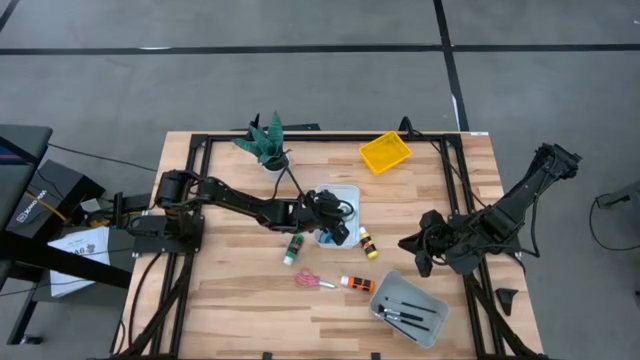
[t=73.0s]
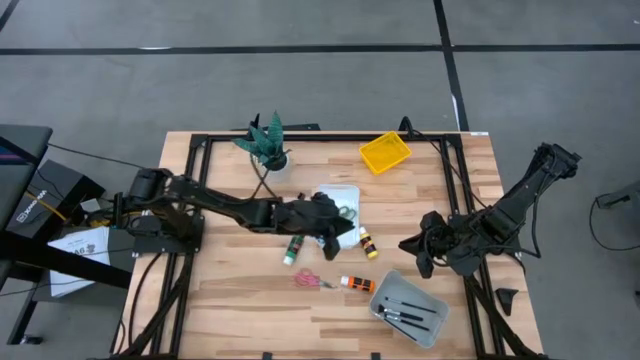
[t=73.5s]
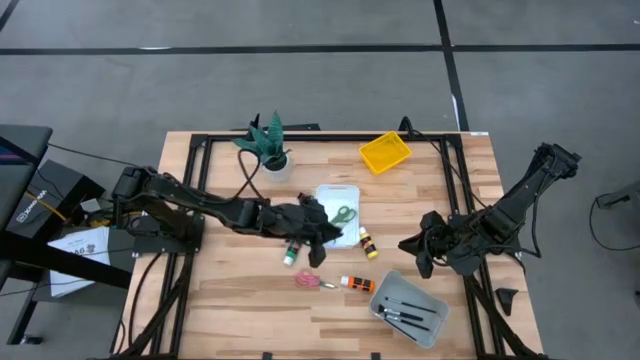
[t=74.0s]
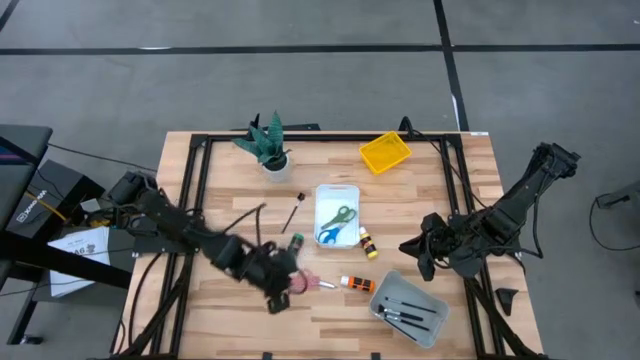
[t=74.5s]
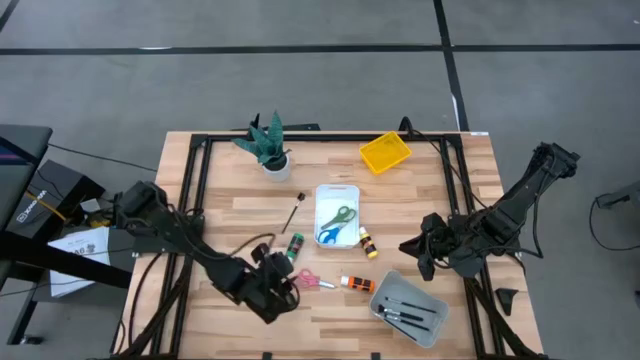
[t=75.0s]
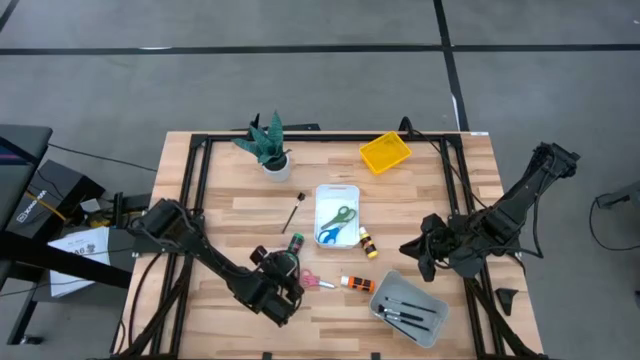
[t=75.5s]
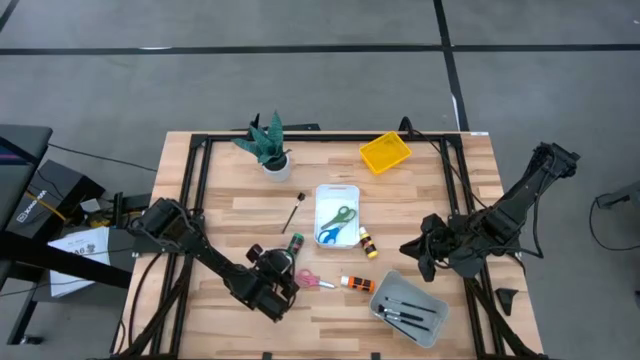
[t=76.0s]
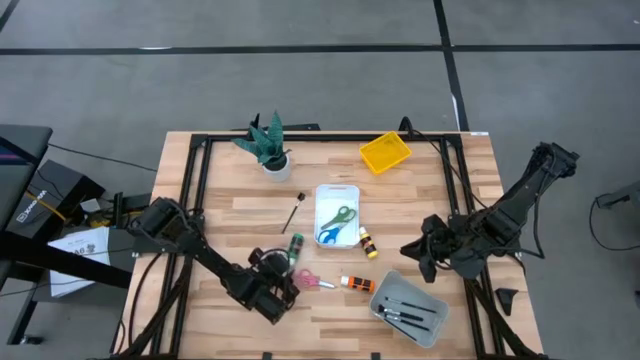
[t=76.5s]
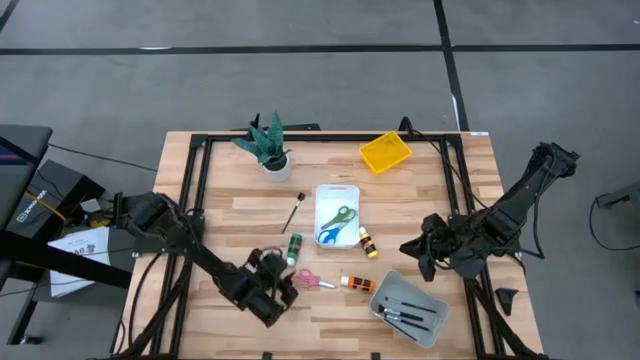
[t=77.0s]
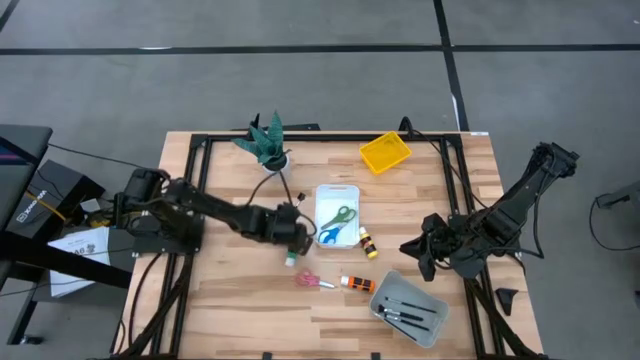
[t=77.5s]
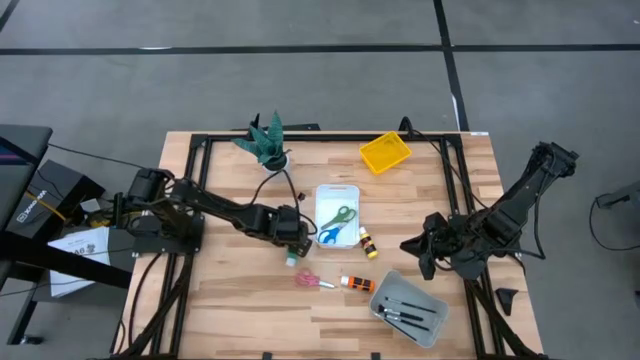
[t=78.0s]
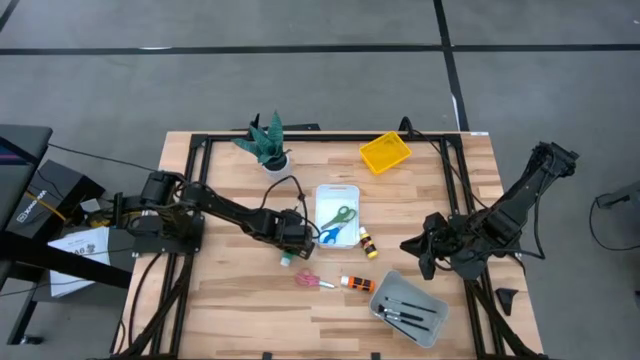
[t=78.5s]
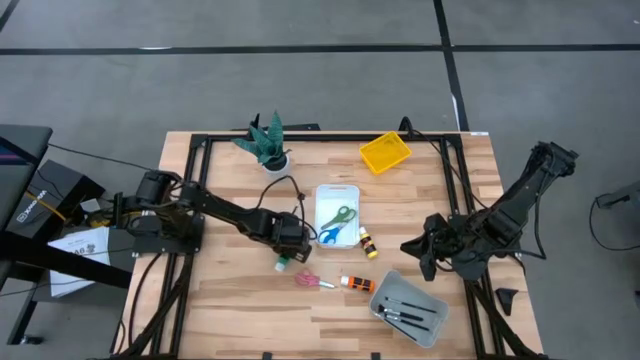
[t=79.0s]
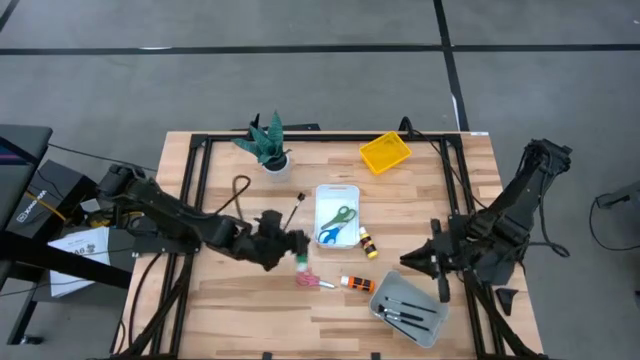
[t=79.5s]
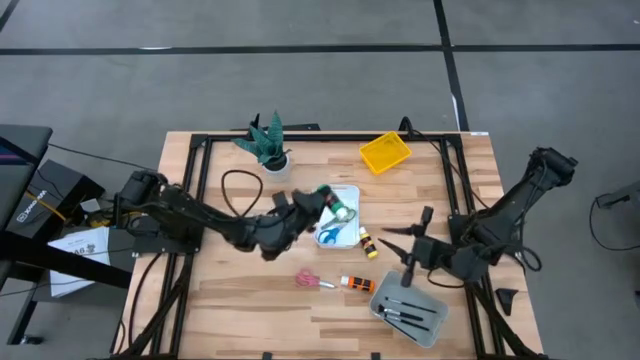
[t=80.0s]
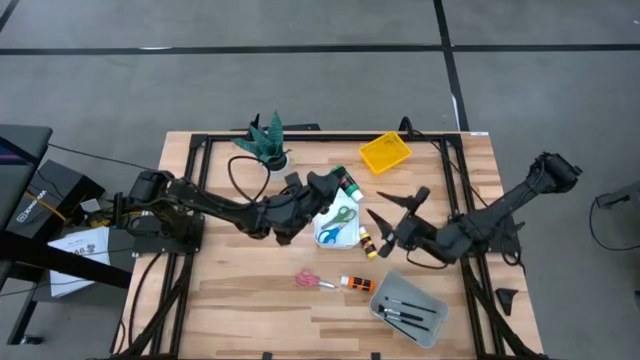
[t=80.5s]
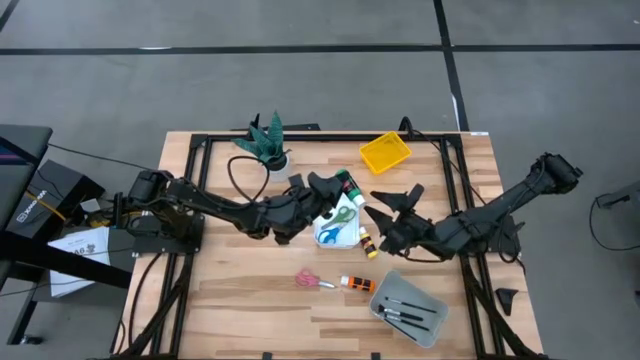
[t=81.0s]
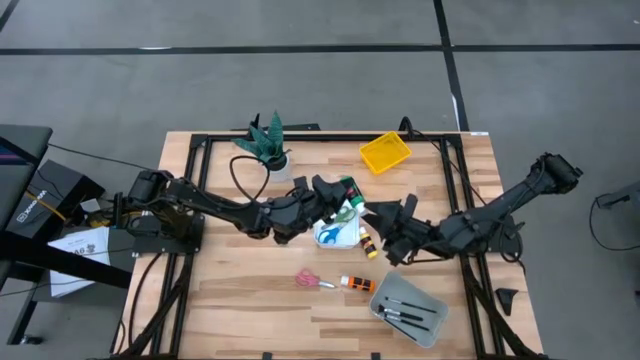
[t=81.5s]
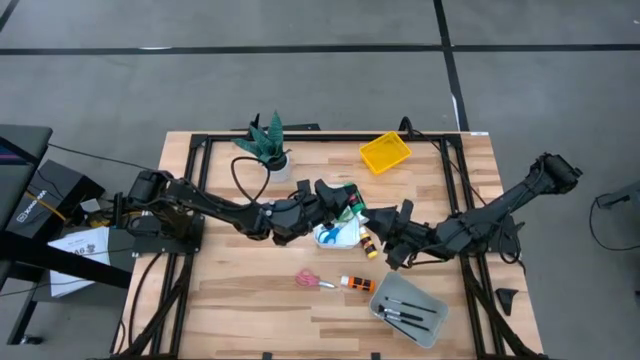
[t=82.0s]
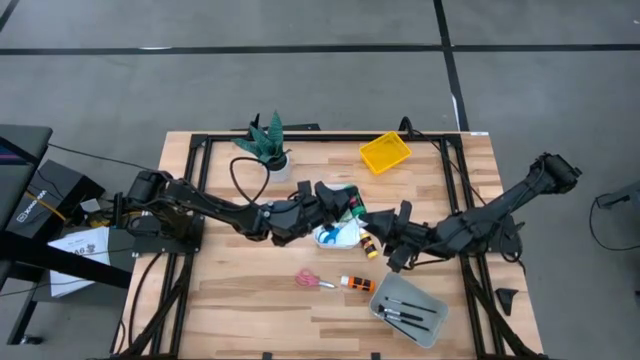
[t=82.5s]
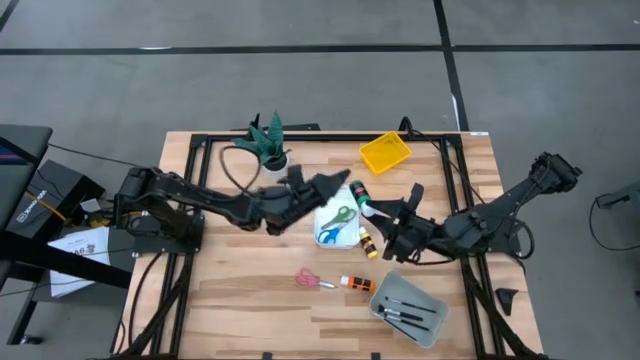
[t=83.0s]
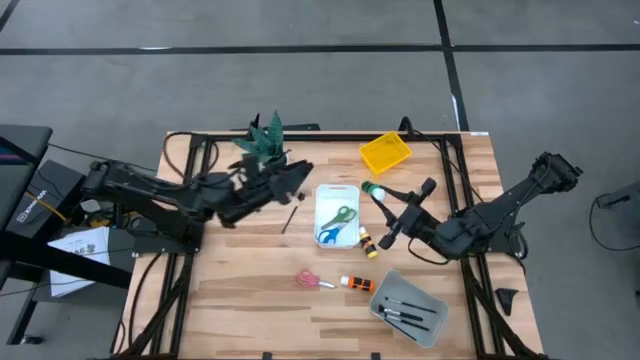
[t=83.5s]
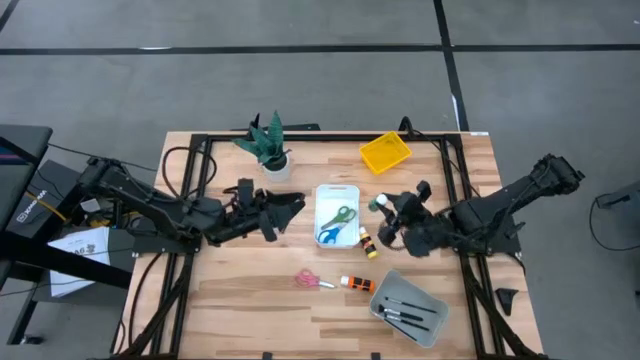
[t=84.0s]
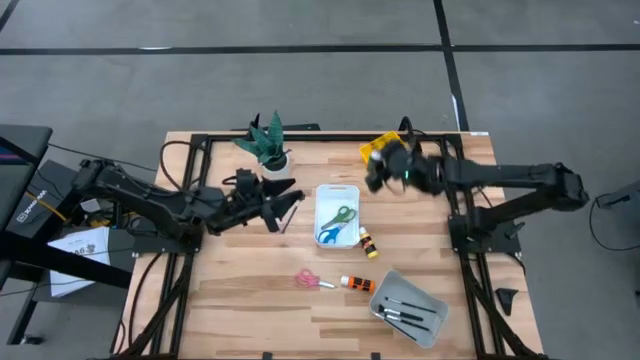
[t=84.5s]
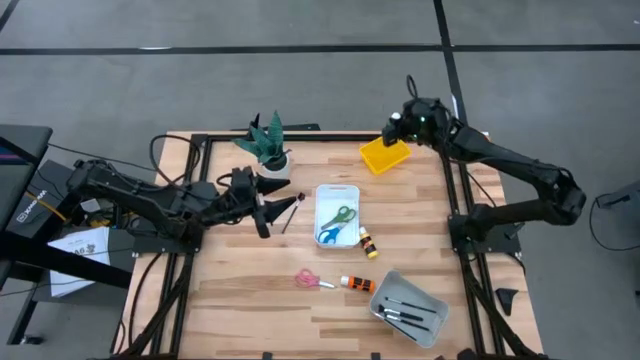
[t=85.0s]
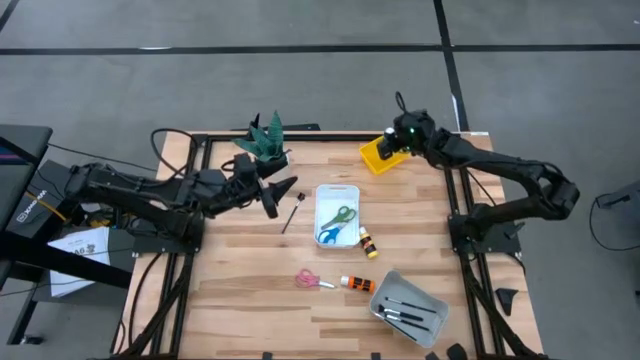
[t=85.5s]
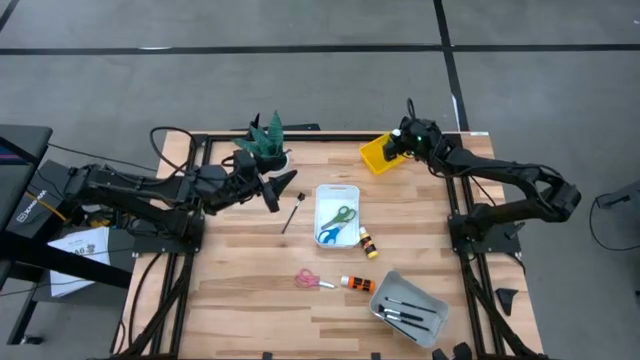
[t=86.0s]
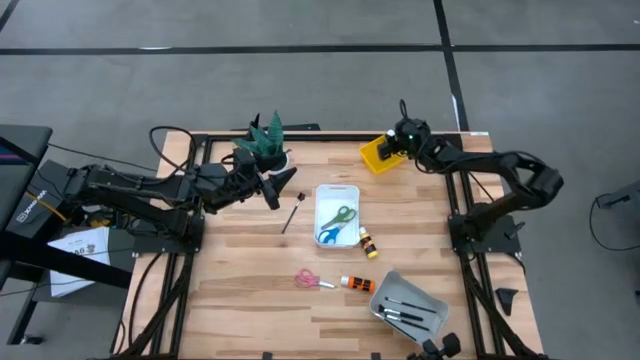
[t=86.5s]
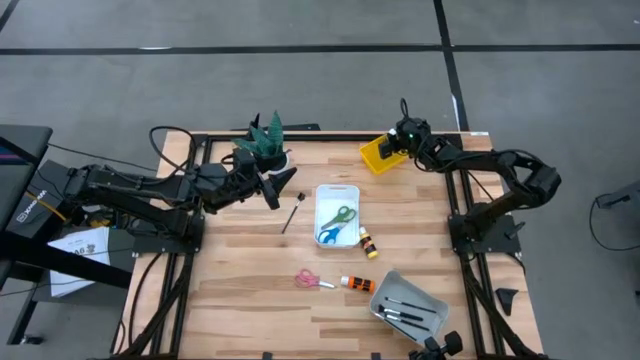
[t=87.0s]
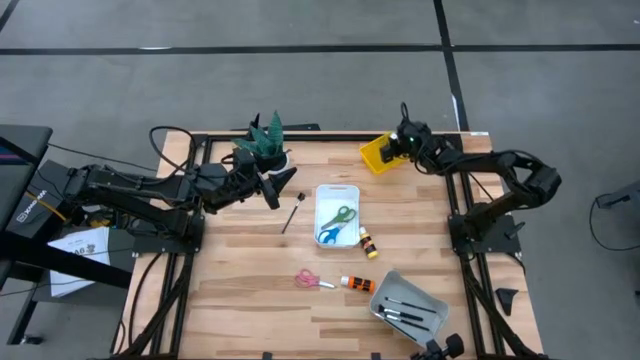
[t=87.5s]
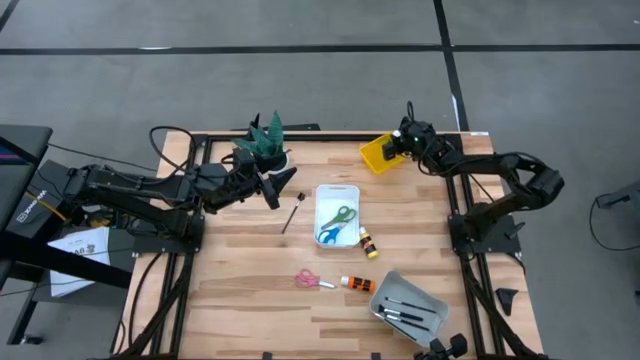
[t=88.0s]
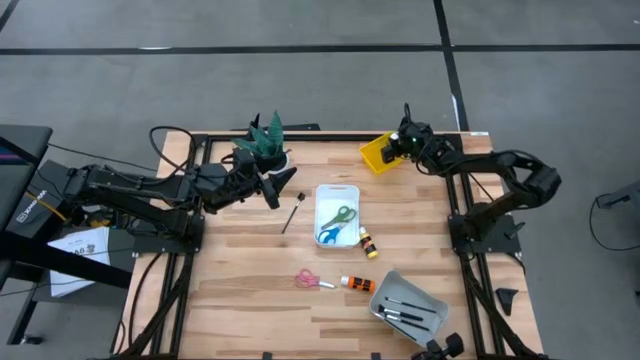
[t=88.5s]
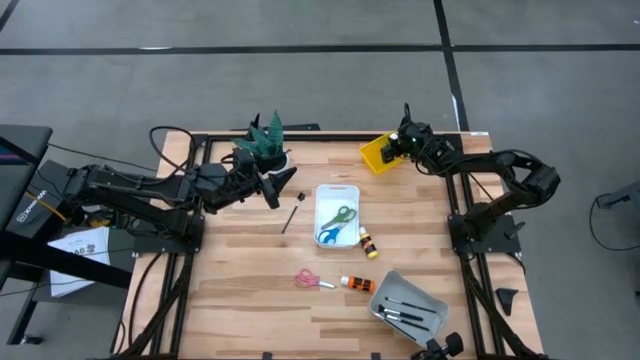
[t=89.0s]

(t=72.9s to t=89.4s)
Task: Pick & Place Paint Supplies
Put the green acrylic paint bottle into the yellow basket

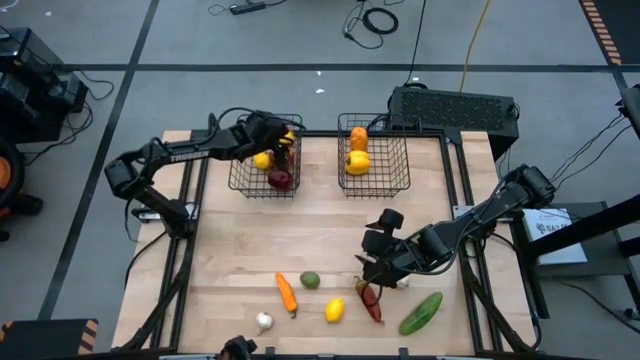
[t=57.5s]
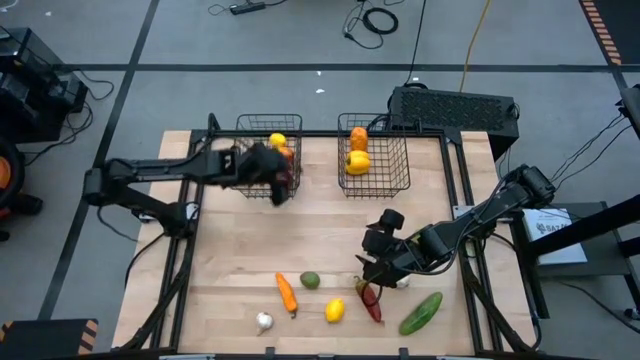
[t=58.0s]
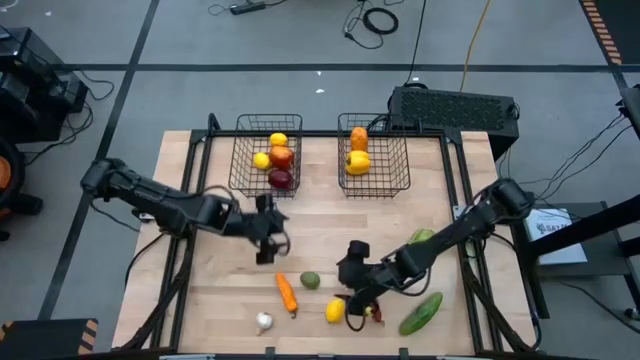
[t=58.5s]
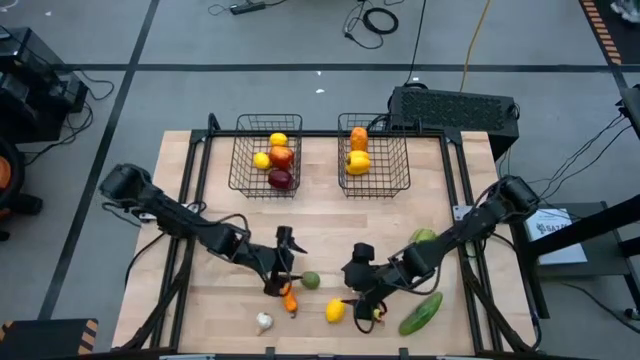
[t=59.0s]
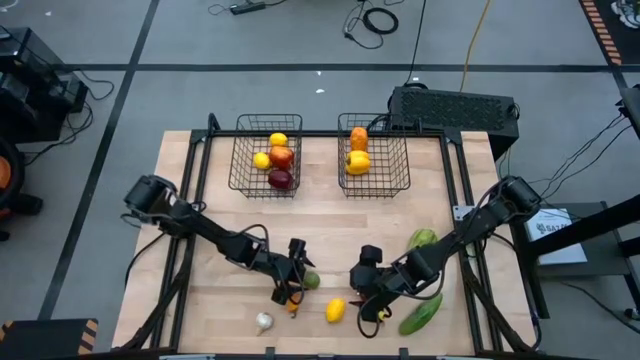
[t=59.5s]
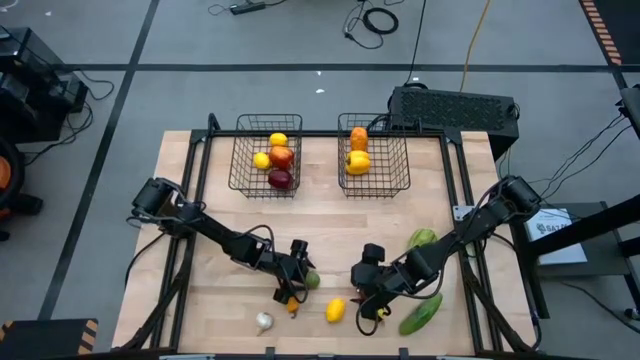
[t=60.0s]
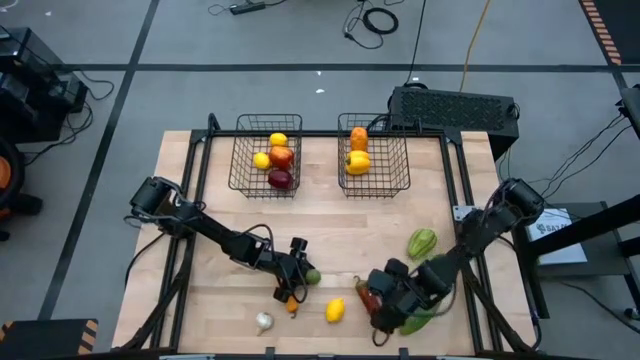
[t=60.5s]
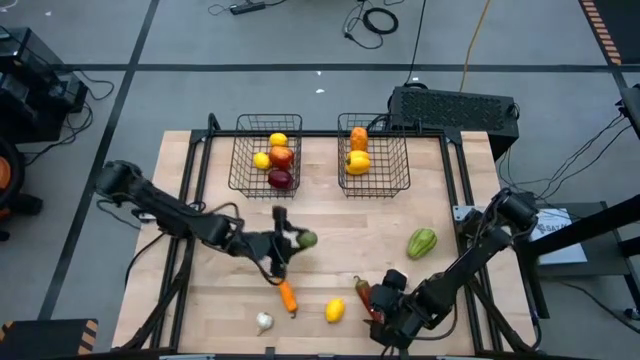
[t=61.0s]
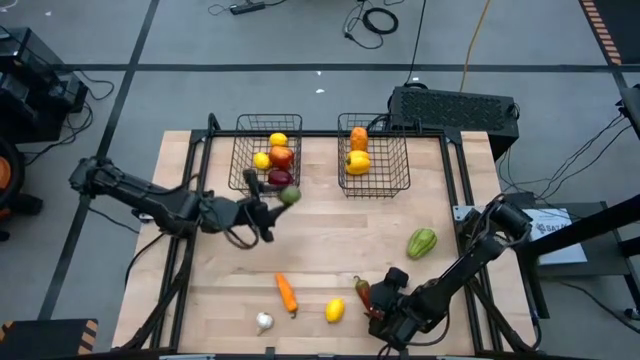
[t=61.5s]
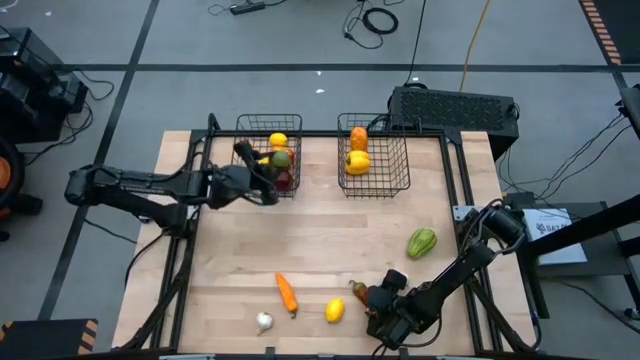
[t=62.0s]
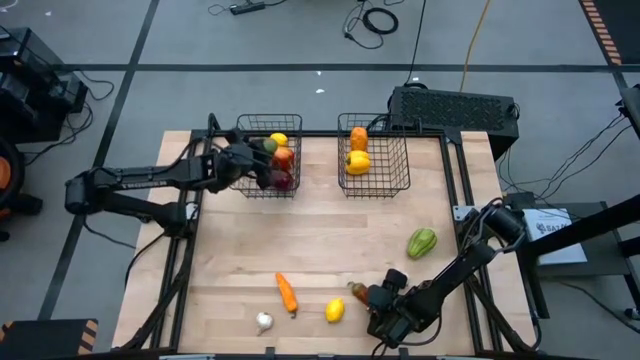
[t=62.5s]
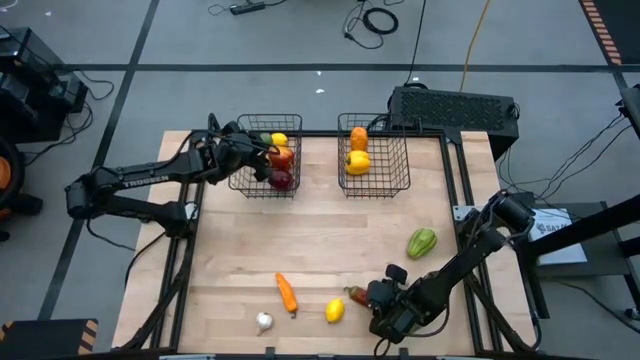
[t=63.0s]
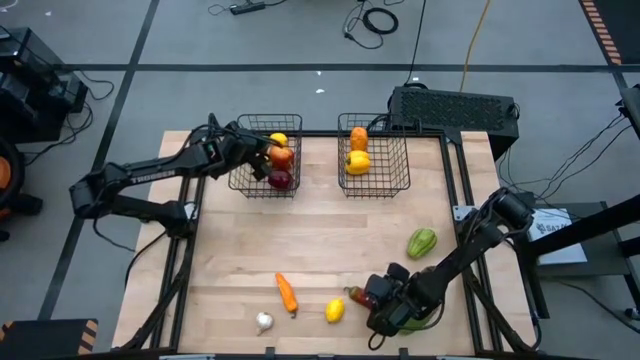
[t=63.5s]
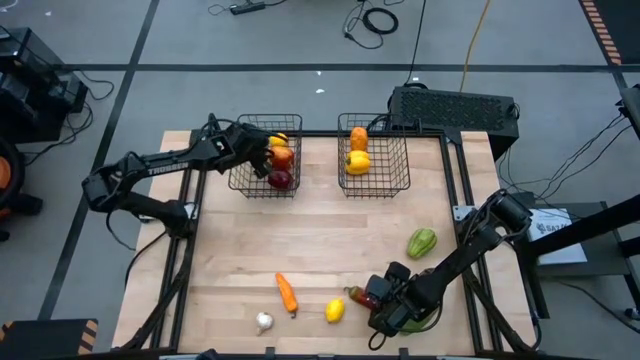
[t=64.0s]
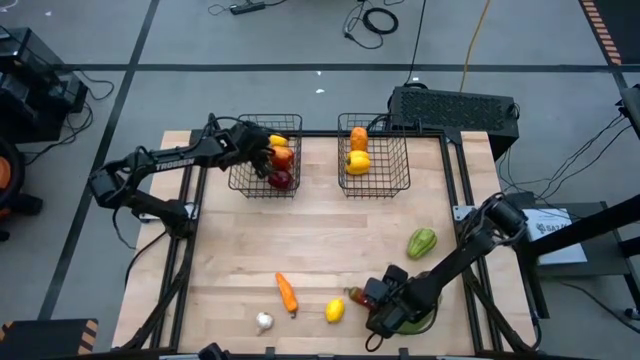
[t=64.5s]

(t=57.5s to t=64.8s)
Task: Sort produce into baskets
Put the green lime into the left mesh basket
